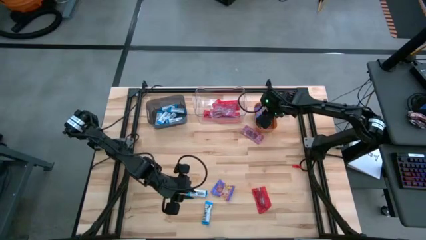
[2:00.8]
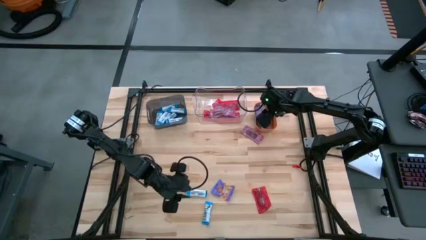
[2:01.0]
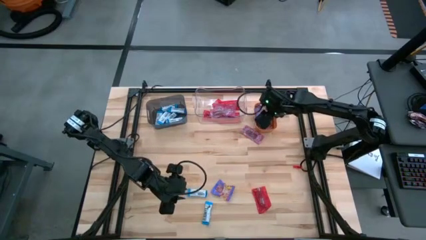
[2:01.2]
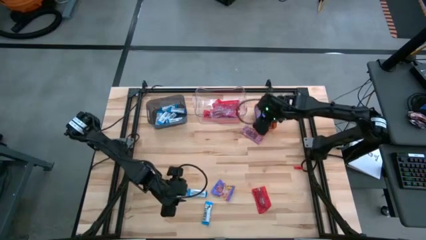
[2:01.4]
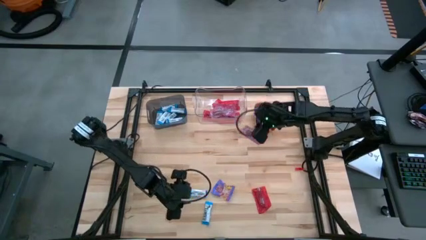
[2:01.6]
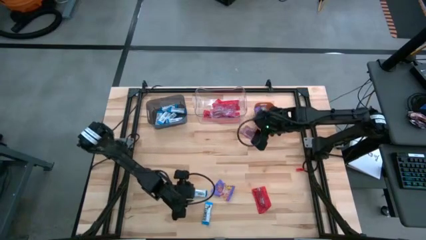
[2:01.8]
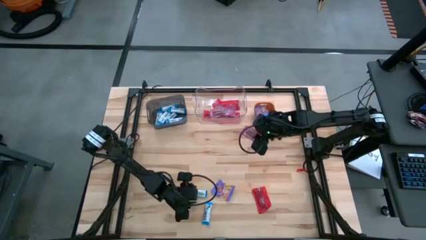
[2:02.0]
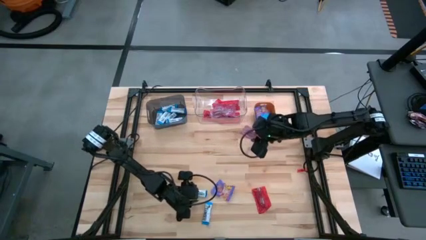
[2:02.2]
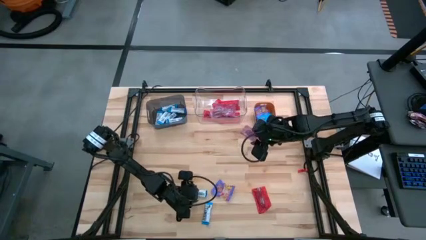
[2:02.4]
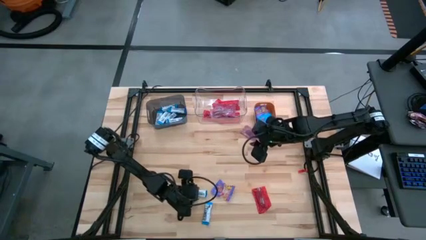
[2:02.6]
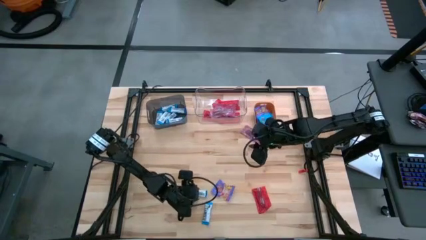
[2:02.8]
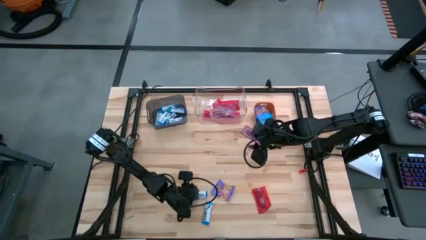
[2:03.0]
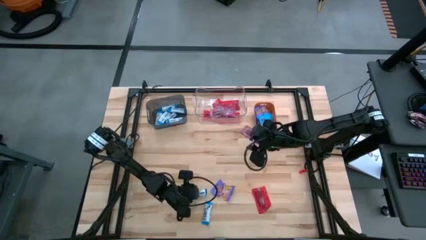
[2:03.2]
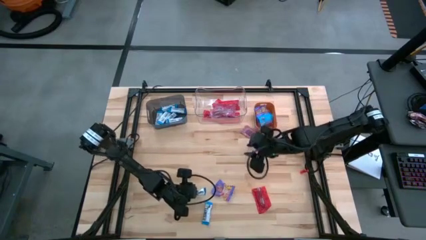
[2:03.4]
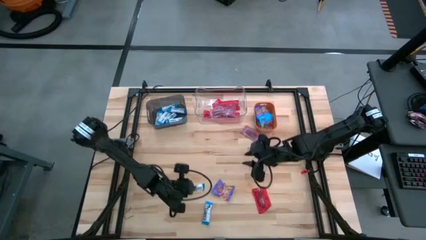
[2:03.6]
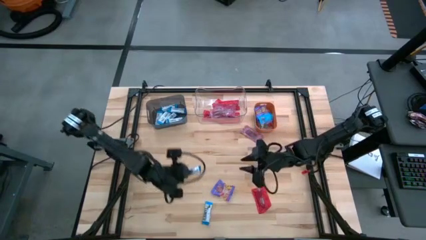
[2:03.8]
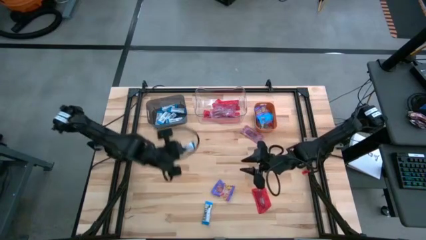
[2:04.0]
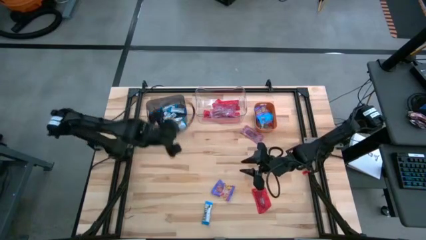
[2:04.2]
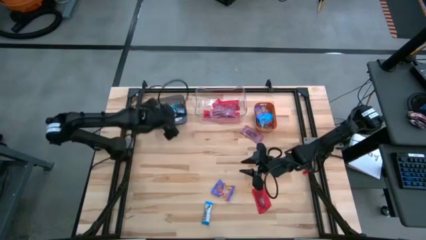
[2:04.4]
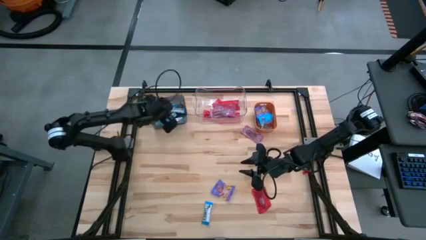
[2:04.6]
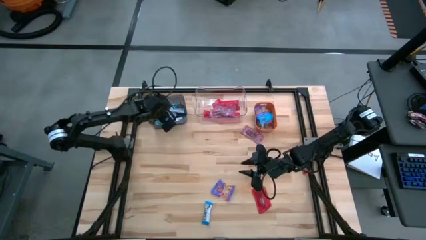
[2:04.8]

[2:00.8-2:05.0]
Task: Sort candy
Put the white chocolate into the black bin

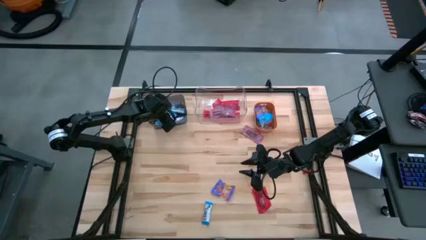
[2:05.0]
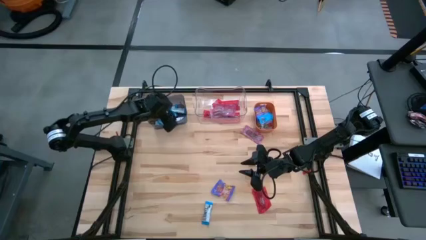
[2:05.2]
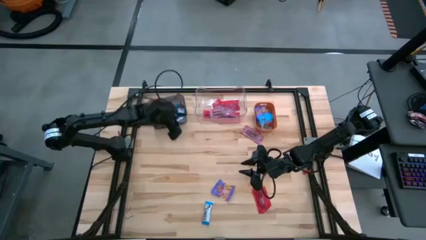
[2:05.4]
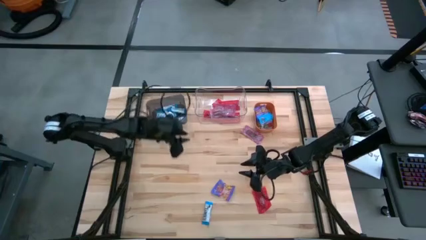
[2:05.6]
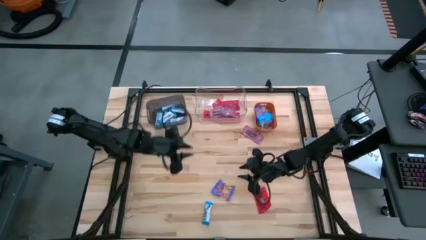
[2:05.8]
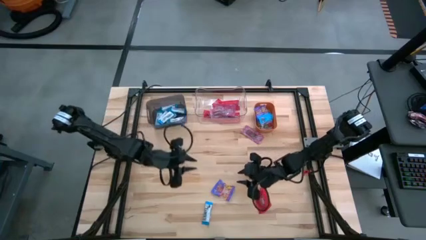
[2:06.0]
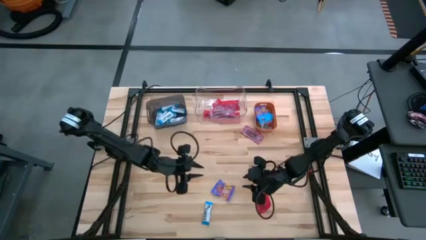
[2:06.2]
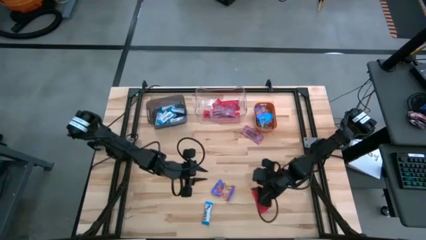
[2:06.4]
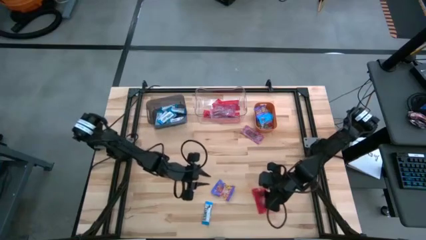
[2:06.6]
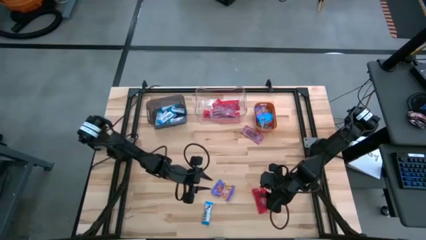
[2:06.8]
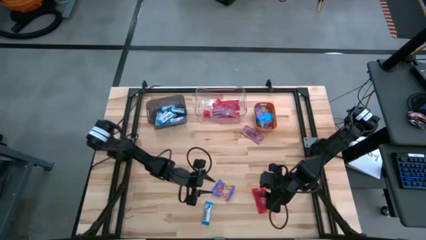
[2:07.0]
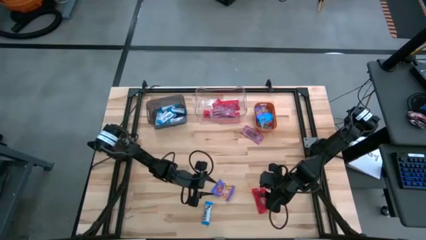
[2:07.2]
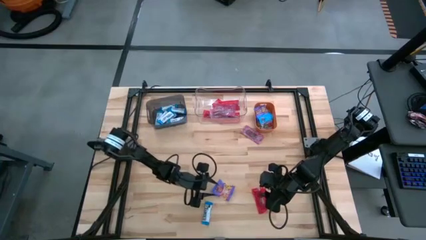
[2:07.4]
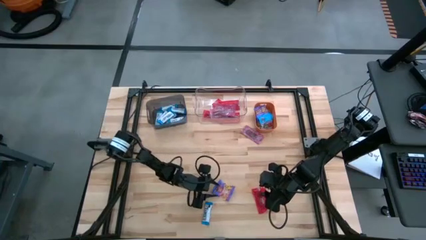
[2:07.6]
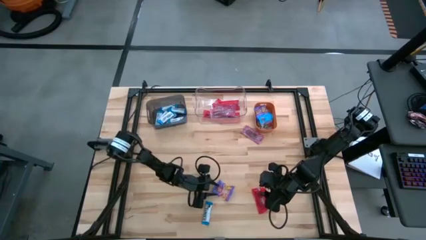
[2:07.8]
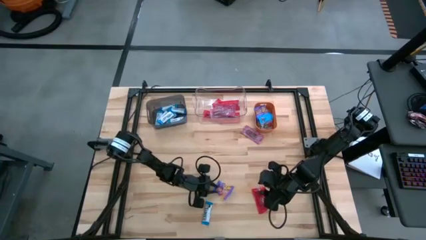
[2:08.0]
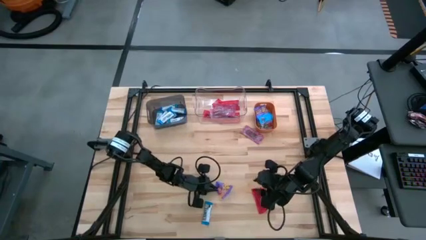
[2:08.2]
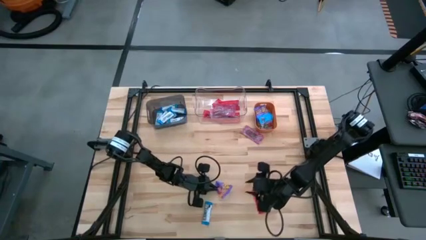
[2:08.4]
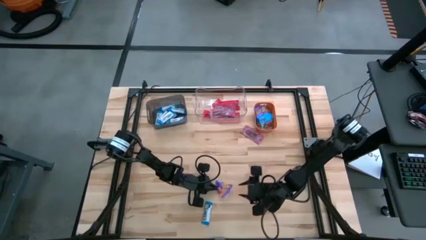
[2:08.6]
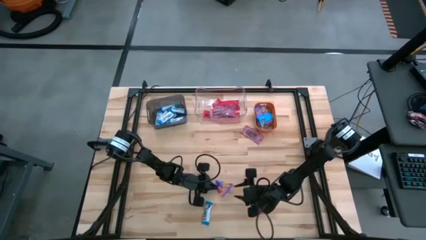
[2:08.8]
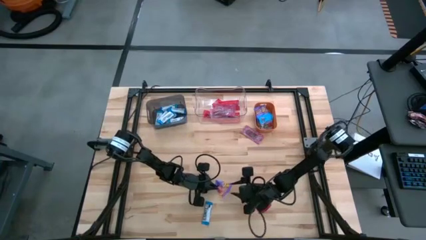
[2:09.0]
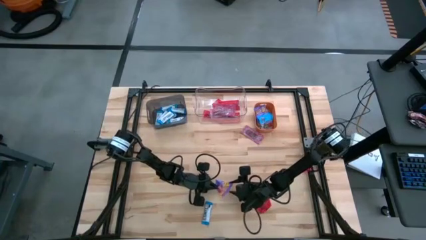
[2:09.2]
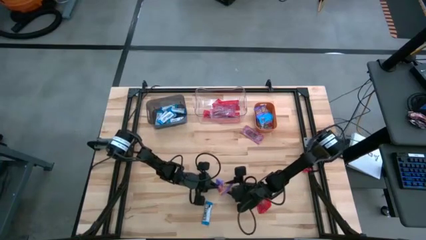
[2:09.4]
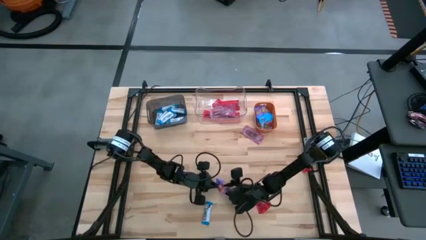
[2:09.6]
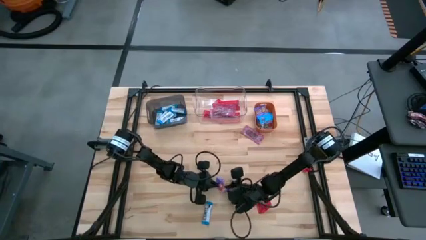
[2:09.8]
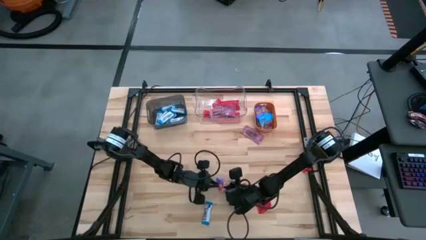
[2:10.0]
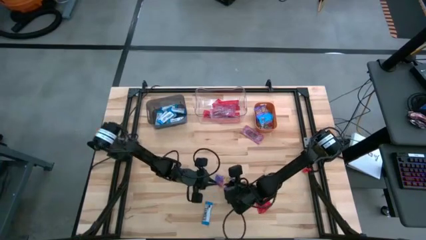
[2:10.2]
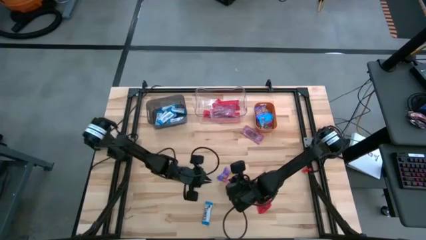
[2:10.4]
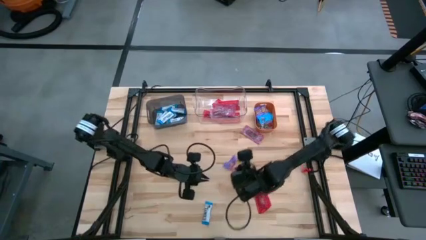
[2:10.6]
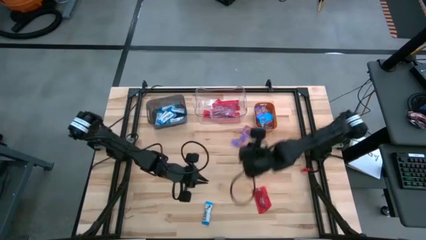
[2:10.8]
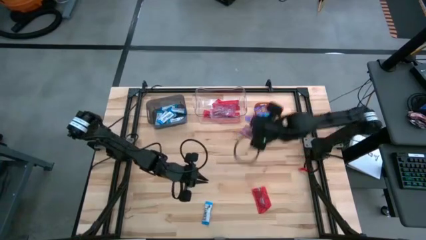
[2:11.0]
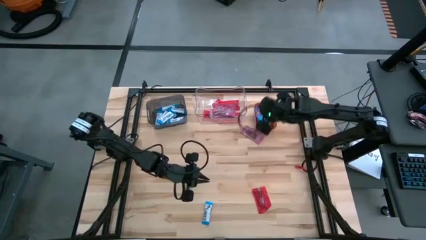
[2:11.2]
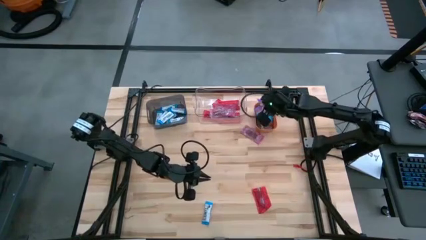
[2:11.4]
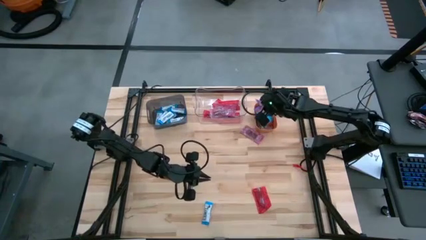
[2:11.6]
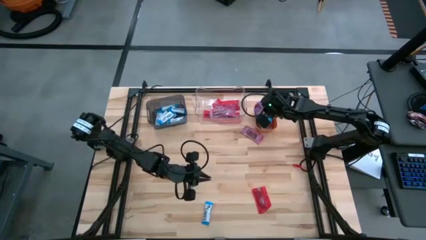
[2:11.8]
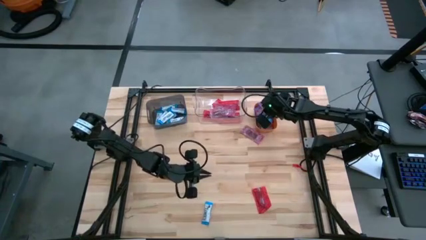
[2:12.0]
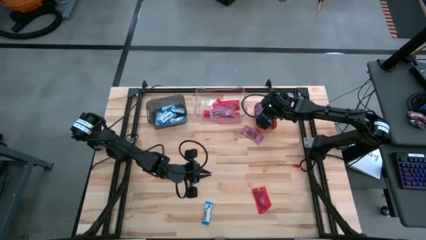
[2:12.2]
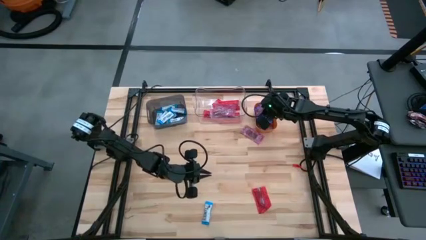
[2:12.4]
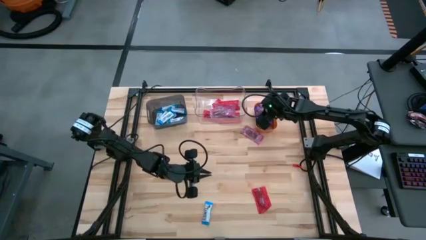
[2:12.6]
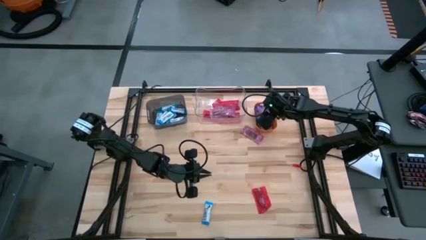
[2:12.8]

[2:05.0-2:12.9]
Put the blue gummy into the orange bin

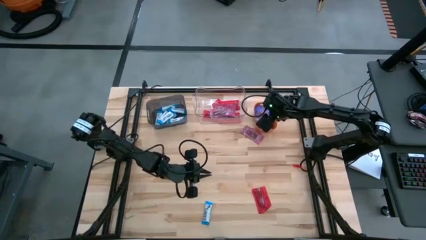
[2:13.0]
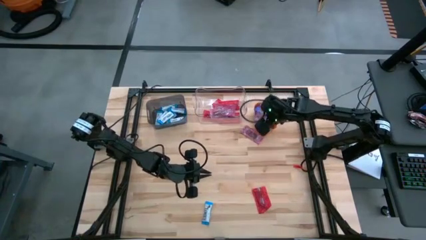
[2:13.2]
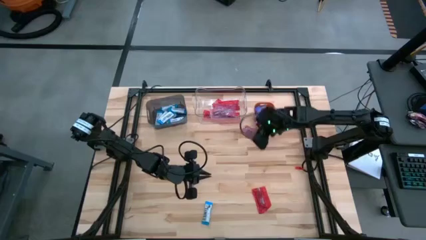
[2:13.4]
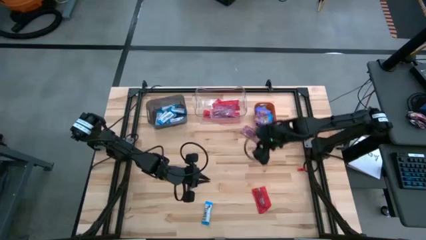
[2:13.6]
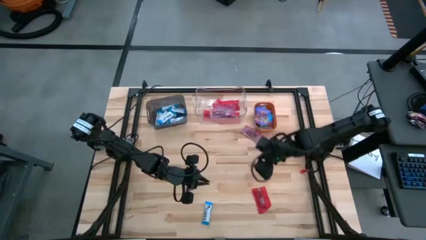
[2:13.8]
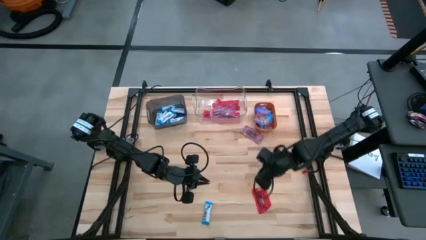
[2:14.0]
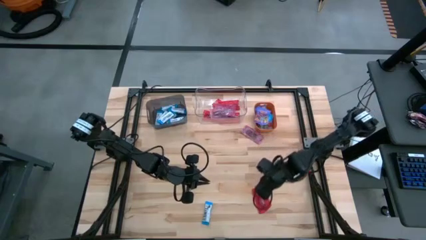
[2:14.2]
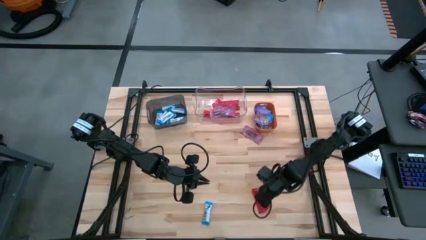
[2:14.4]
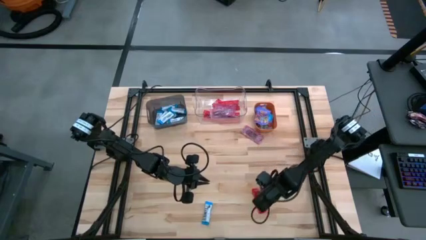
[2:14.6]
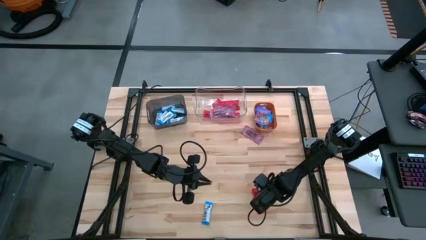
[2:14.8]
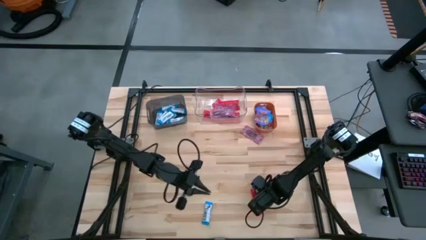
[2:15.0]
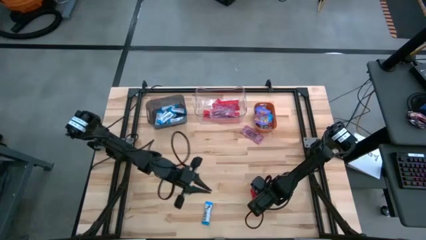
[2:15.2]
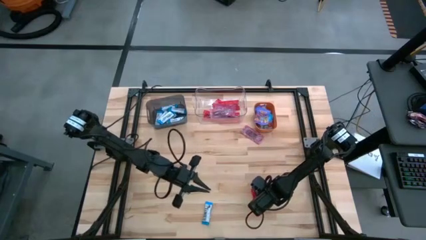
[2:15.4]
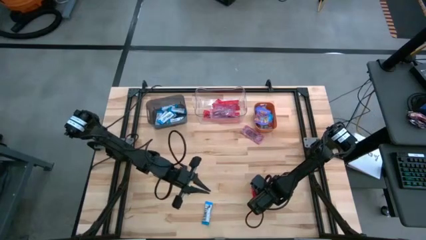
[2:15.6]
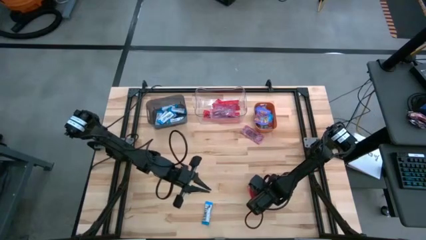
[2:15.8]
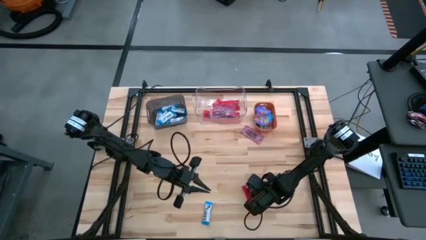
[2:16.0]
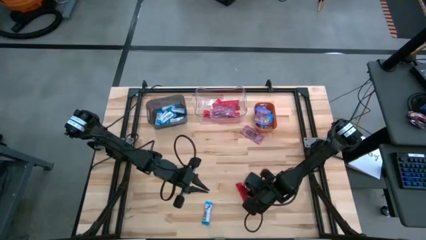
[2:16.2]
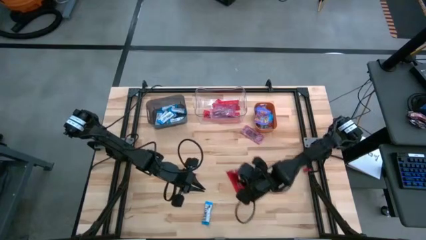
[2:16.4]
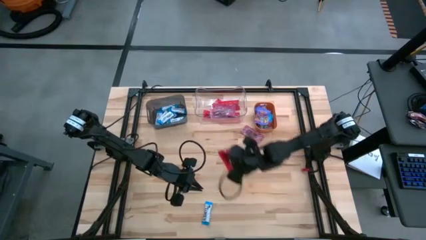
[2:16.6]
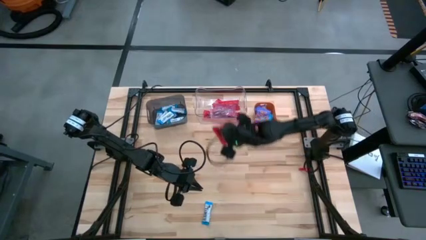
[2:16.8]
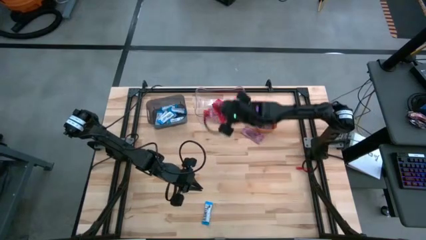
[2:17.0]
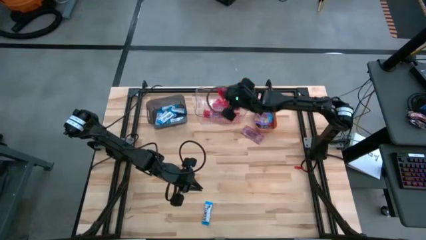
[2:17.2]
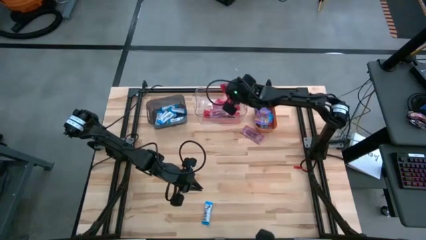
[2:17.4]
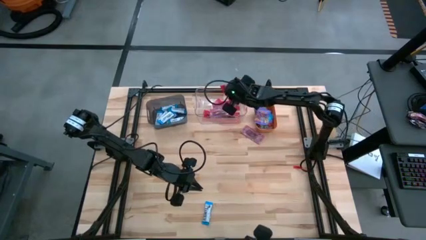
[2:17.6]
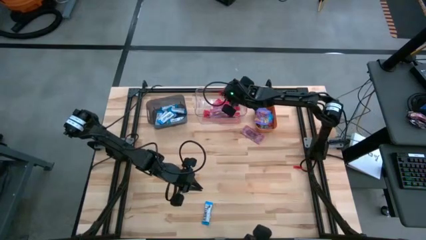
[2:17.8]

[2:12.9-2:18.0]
Put the red chocolate into the transparent bin
